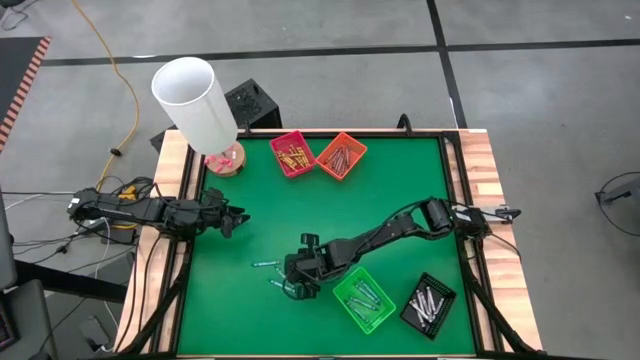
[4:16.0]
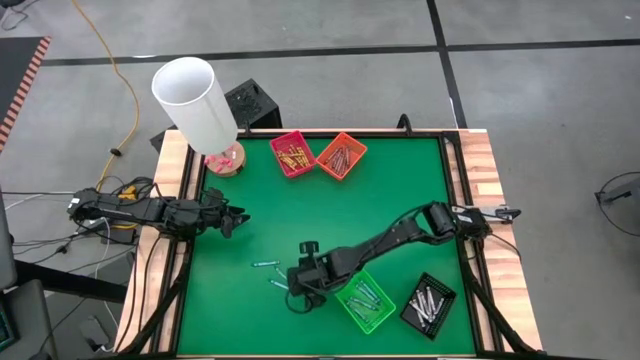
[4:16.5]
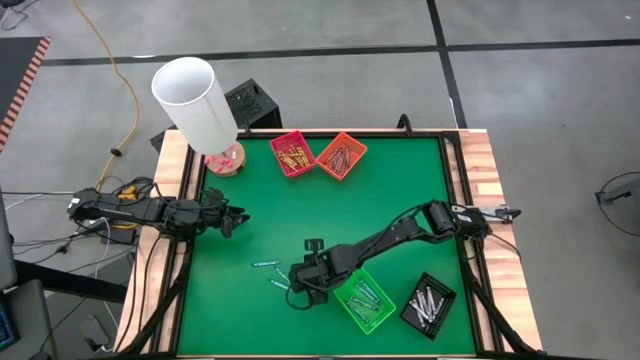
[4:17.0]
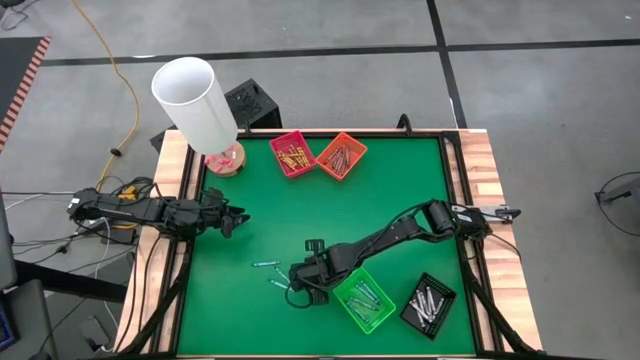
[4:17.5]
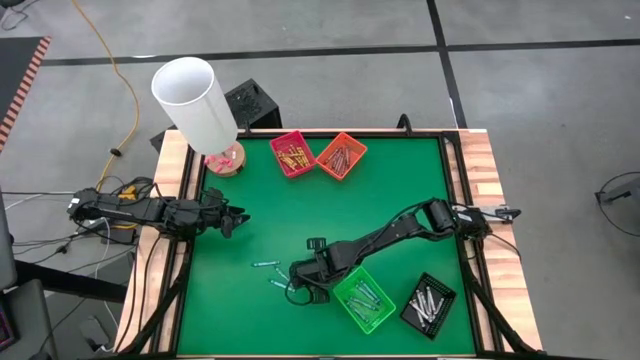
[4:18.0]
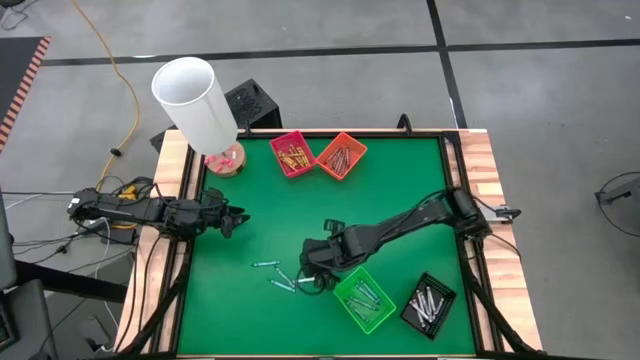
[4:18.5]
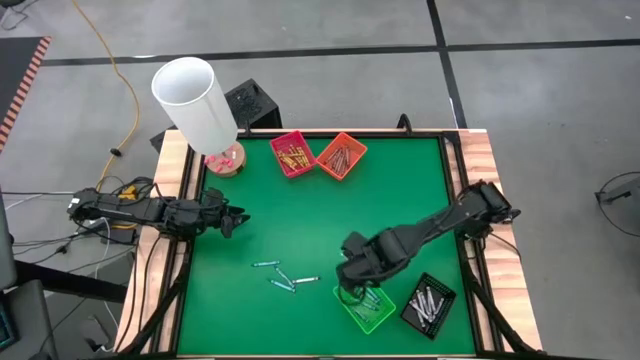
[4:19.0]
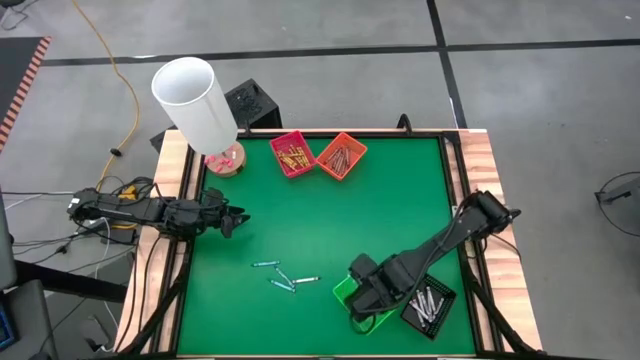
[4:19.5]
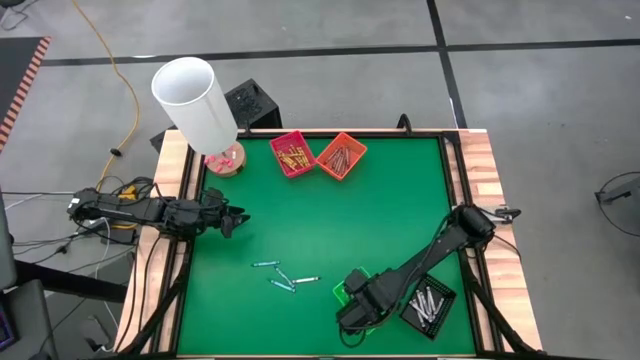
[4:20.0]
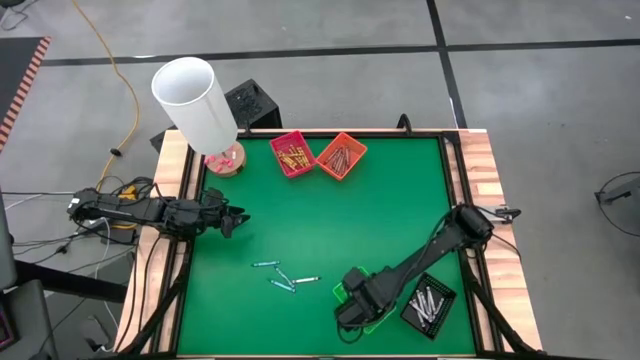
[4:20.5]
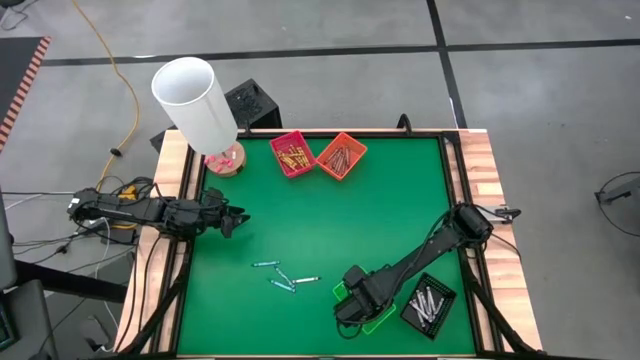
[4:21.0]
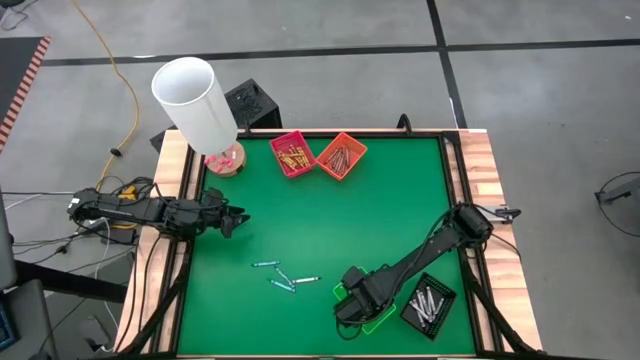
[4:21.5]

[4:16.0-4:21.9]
Task: Sort crayons
Put the green crayon into the green bin

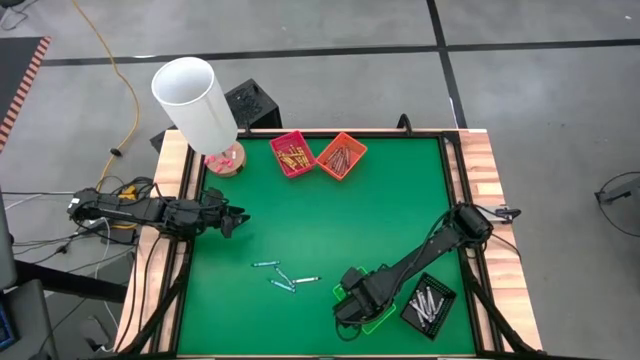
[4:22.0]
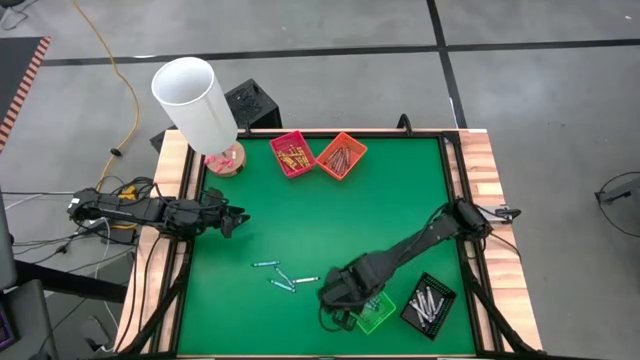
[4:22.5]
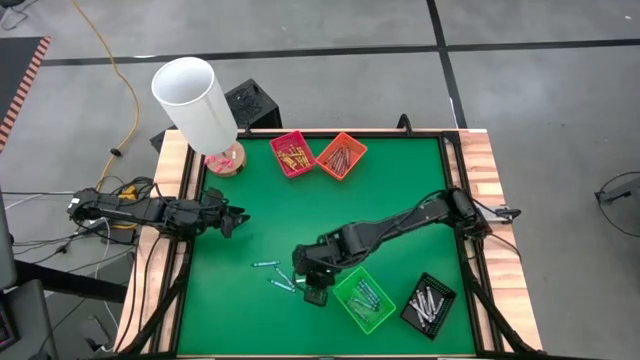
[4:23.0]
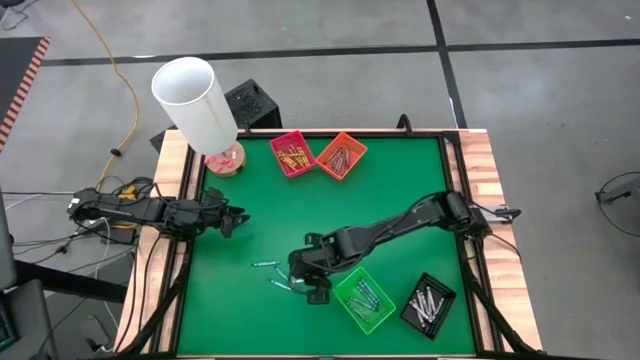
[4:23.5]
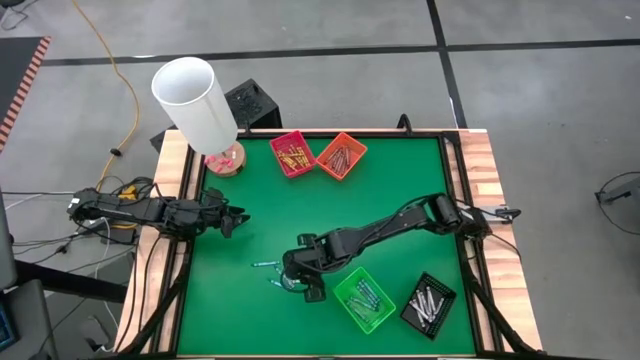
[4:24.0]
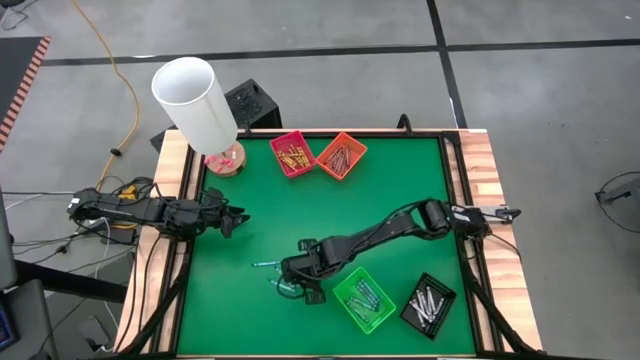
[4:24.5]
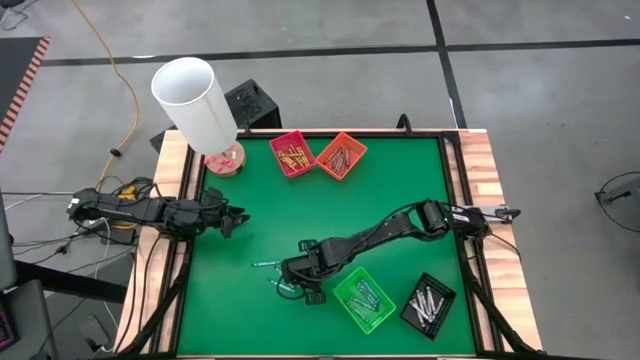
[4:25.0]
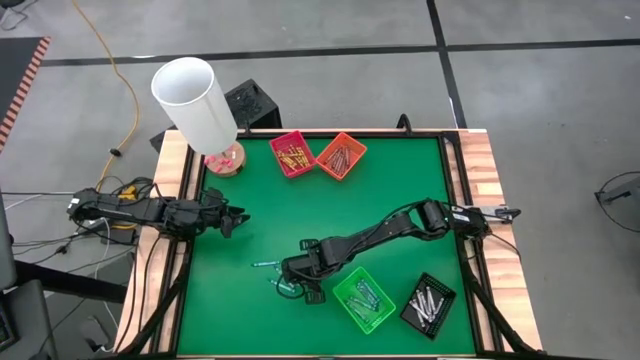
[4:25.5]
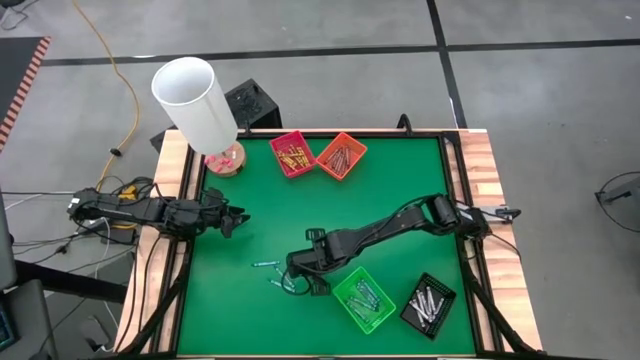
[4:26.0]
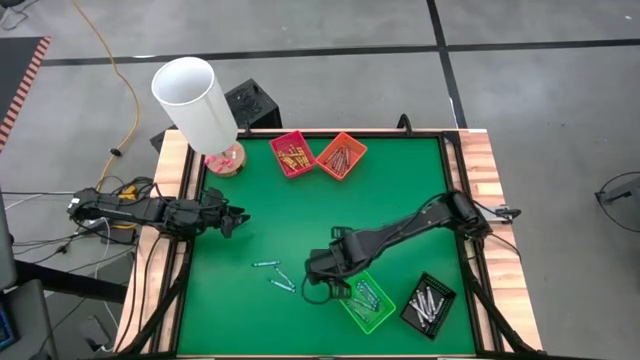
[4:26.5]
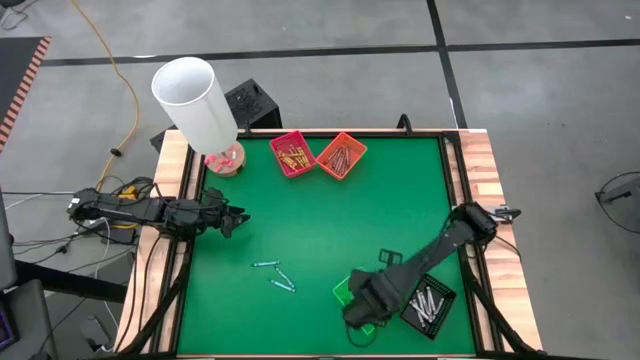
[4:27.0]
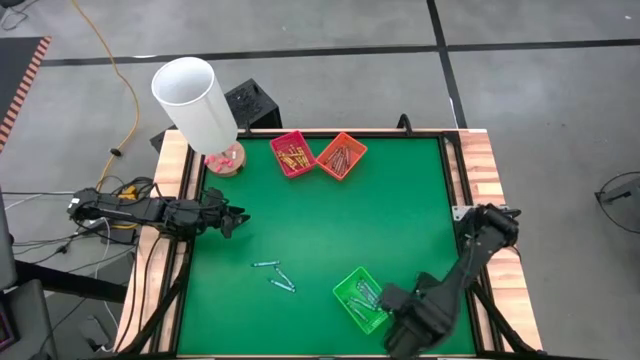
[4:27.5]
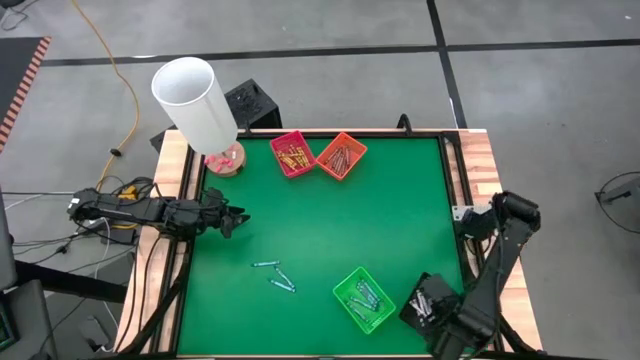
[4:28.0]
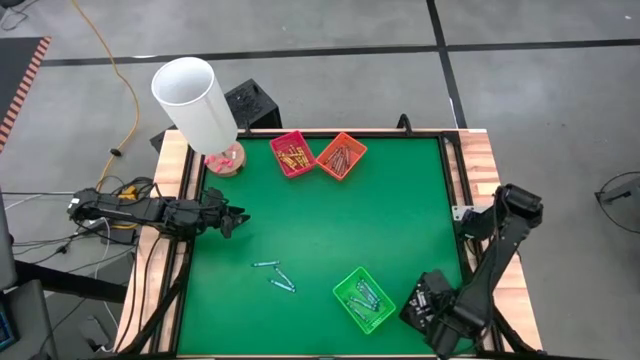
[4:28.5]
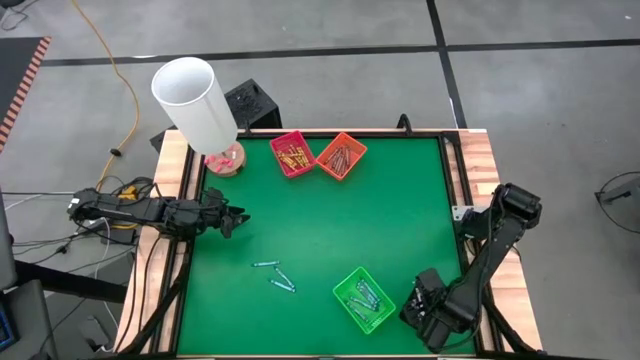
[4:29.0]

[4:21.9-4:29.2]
Put the black crayon into the black bin

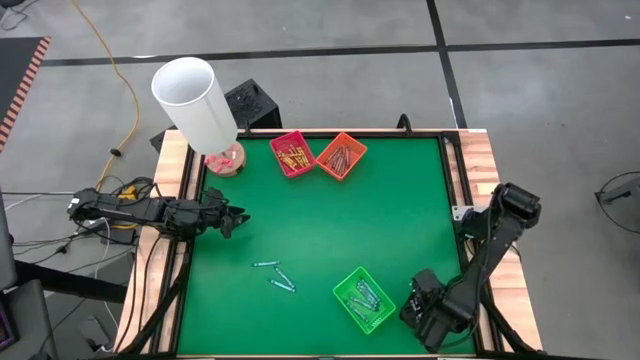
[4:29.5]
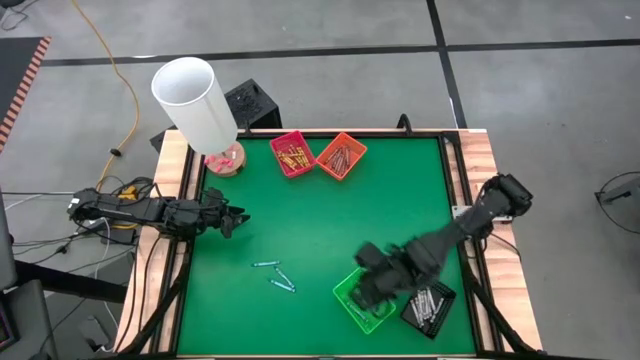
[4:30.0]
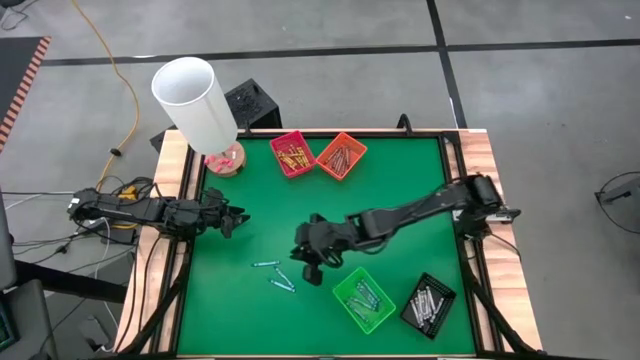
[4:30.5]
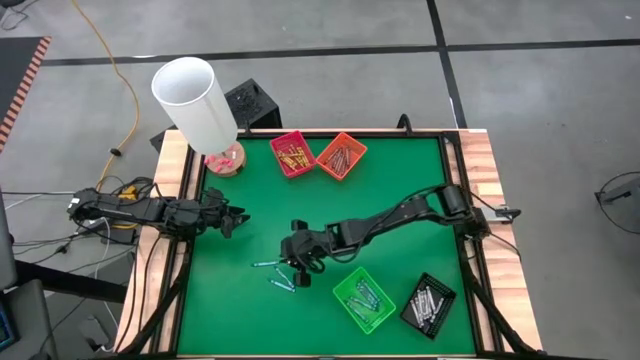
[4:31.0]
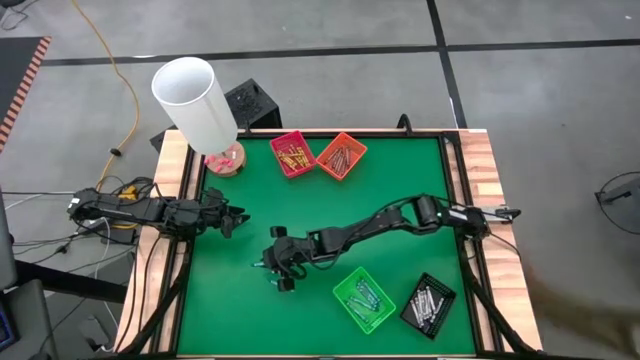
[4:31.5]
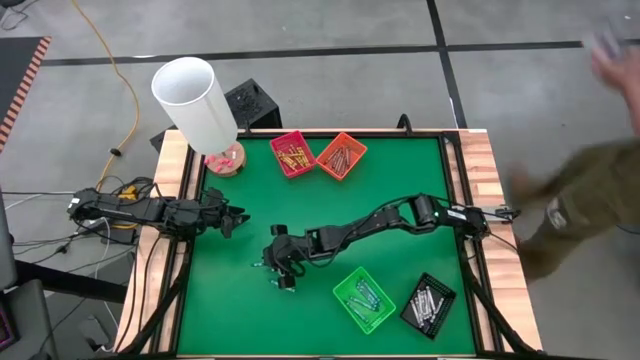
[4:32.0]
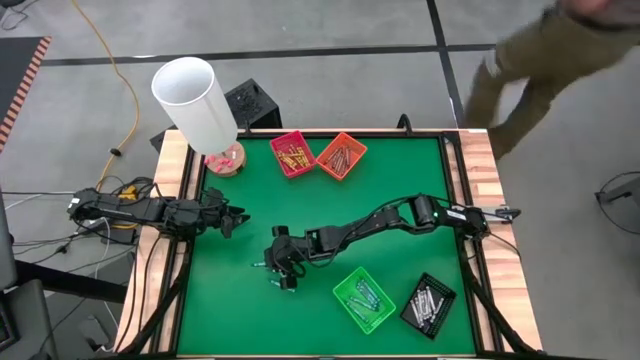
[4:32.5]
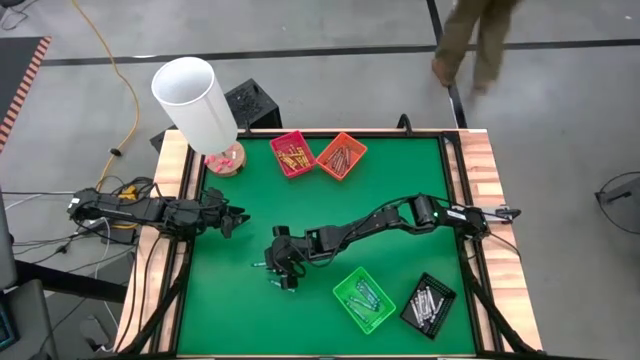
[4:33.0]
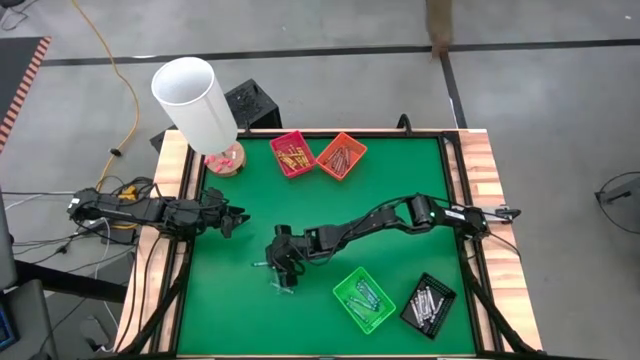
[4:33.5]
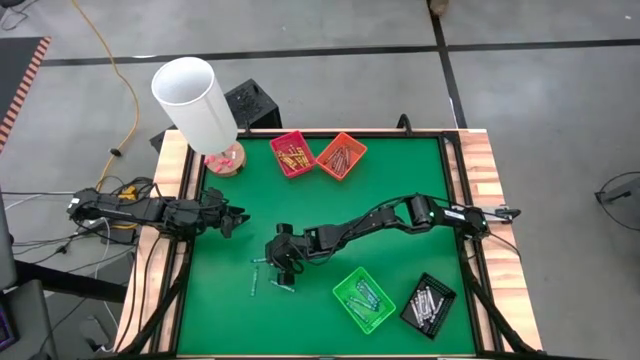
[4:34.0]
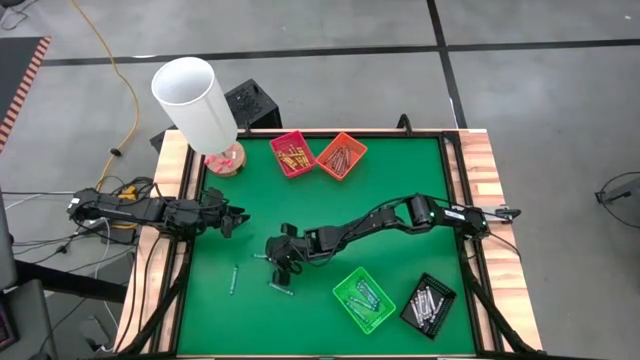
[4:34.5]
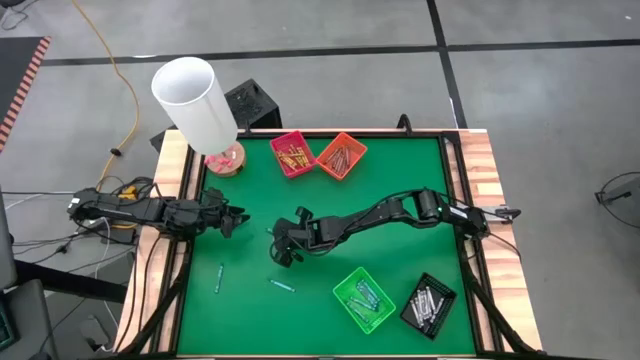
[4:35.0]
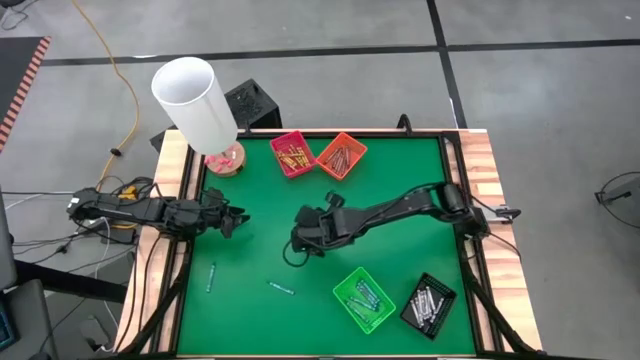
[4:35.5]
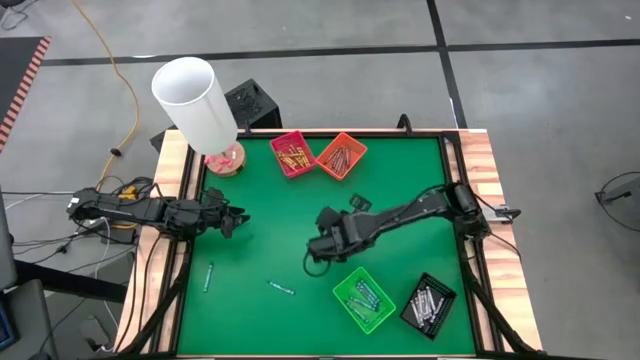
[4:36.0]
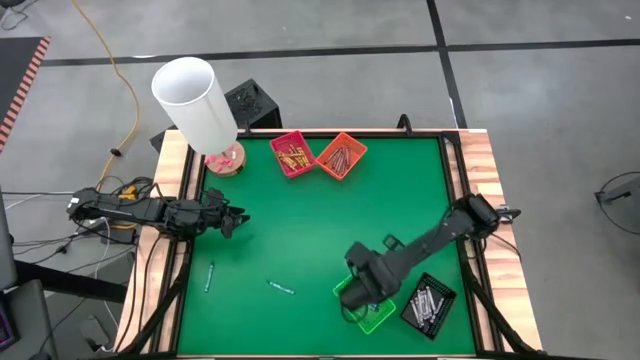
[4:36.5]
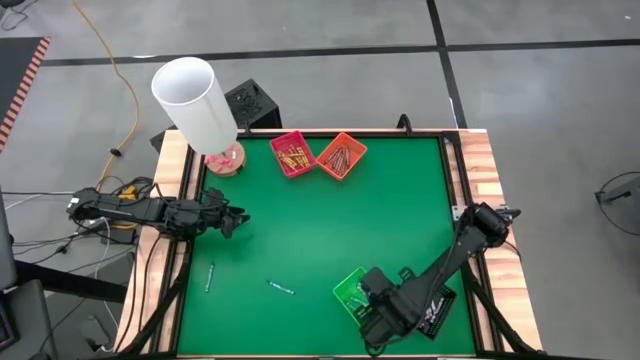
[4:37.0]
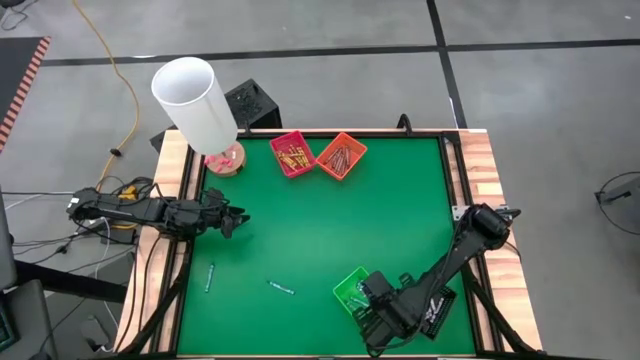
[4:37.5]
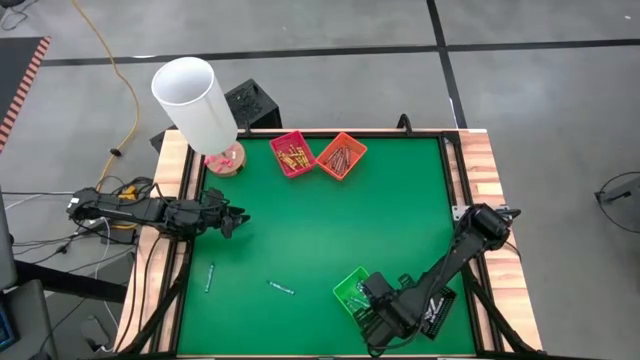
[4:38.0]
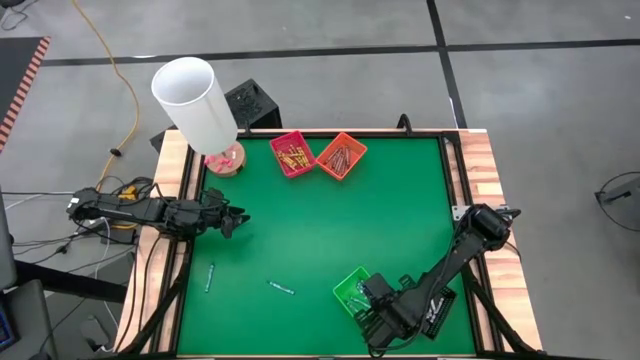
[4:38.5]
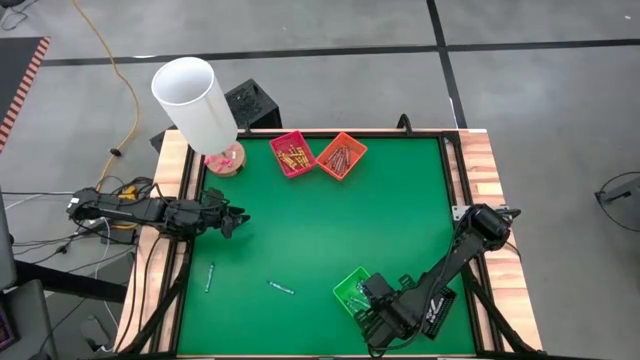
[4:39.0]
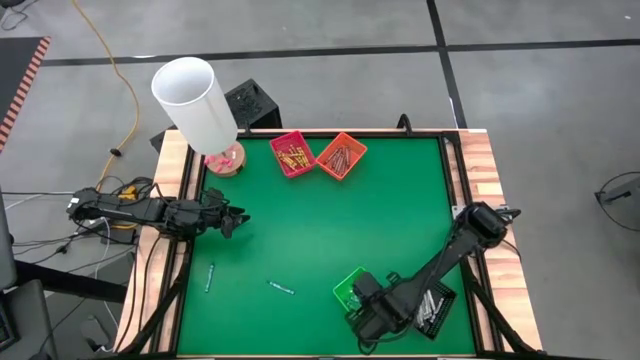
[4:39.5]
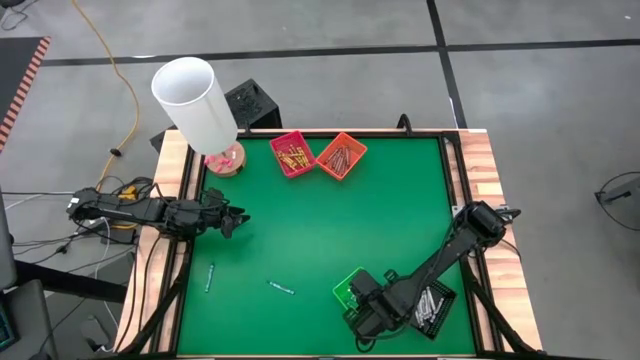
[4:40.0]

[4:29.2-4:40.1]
Put the green crayon into the green bin
